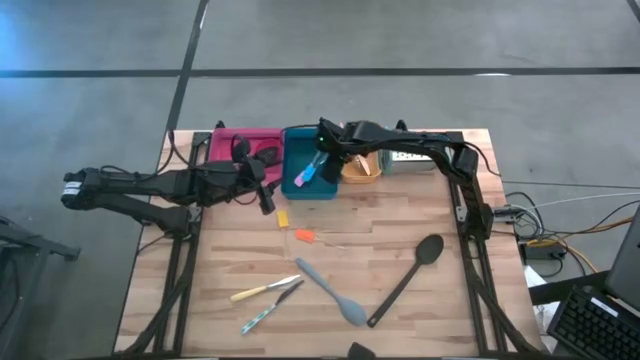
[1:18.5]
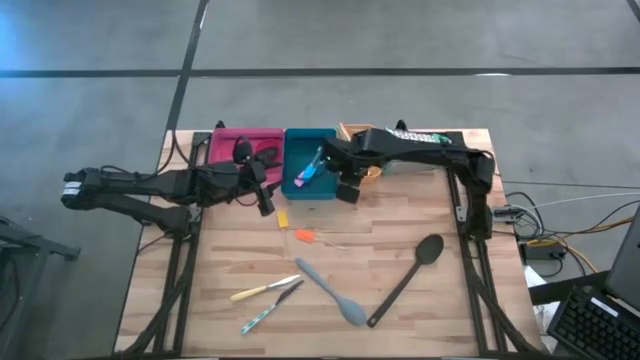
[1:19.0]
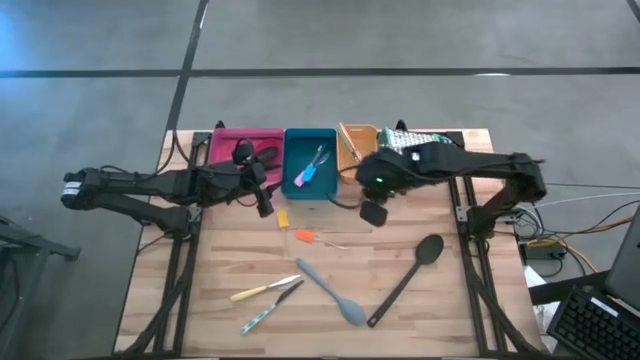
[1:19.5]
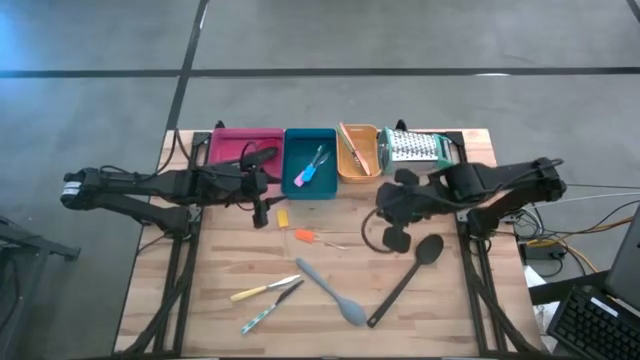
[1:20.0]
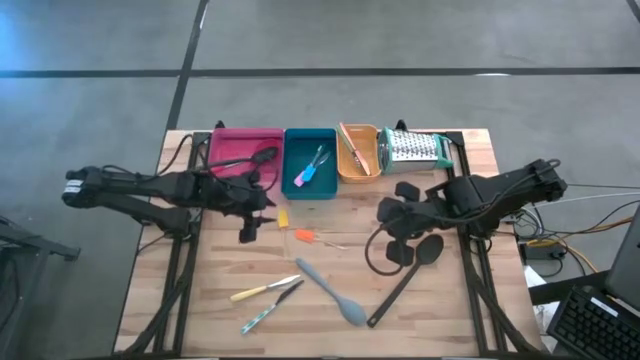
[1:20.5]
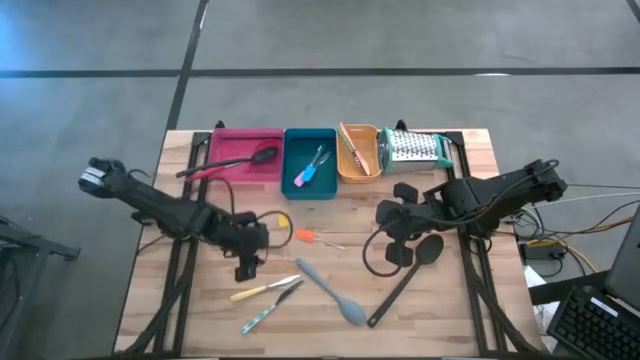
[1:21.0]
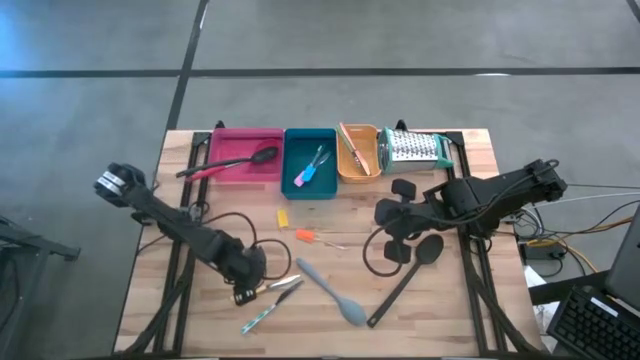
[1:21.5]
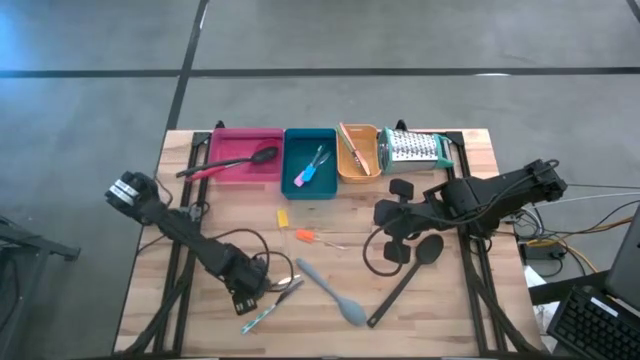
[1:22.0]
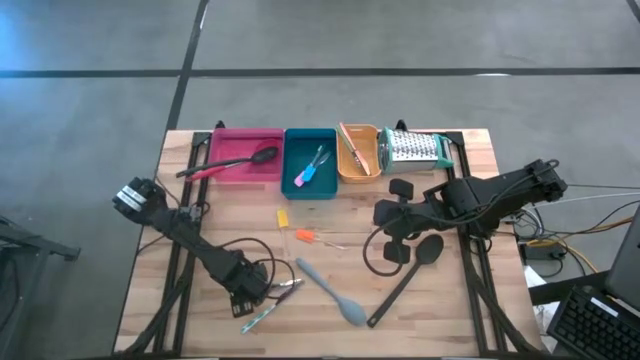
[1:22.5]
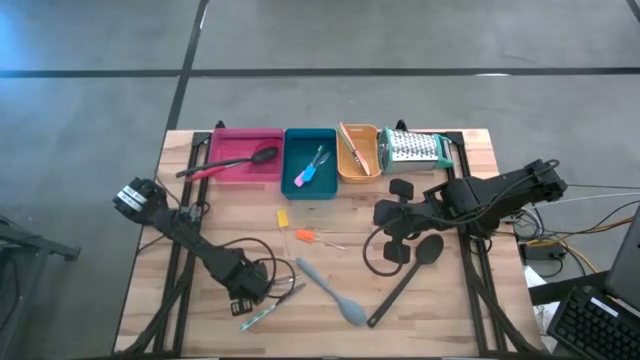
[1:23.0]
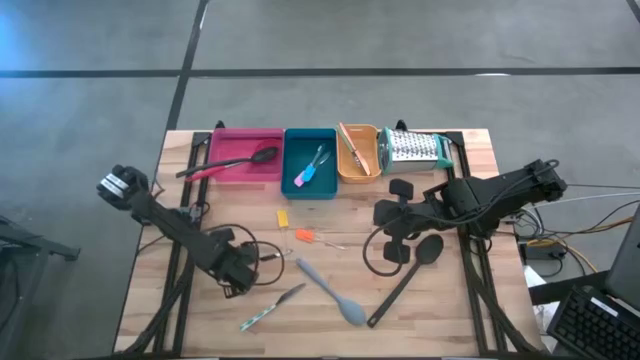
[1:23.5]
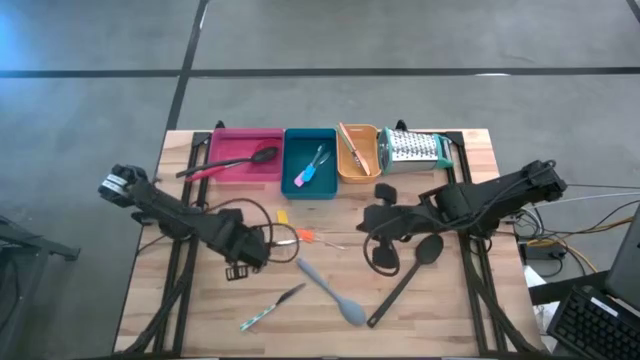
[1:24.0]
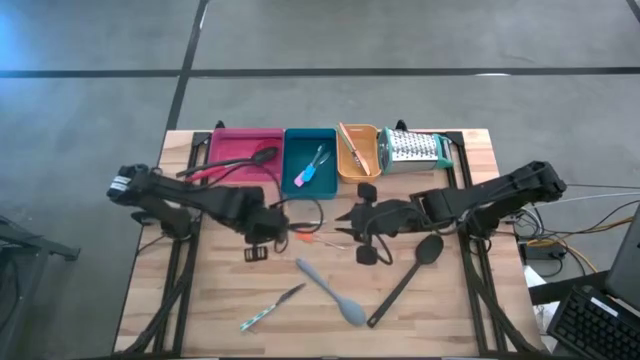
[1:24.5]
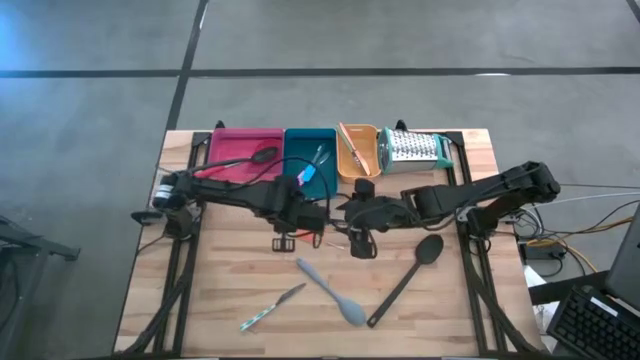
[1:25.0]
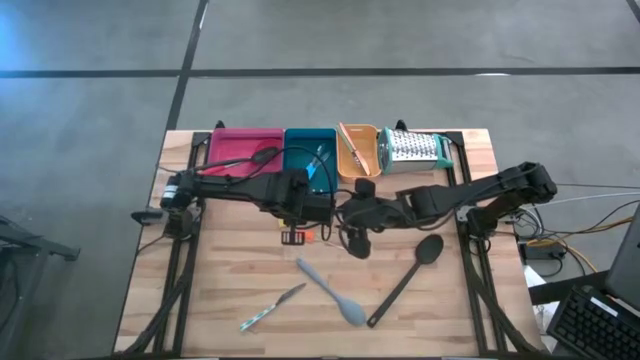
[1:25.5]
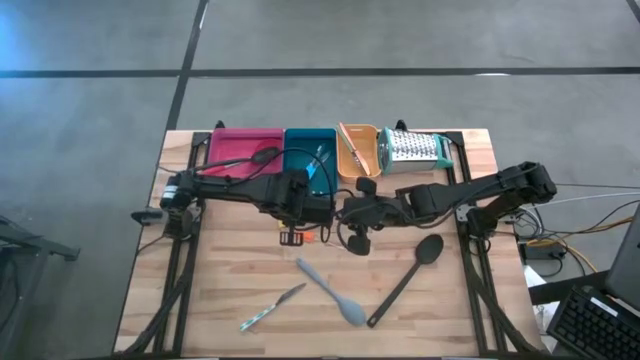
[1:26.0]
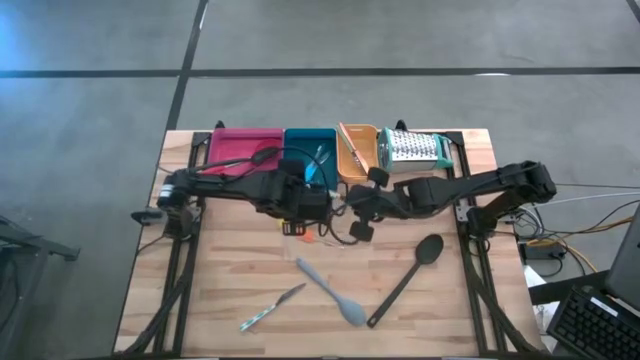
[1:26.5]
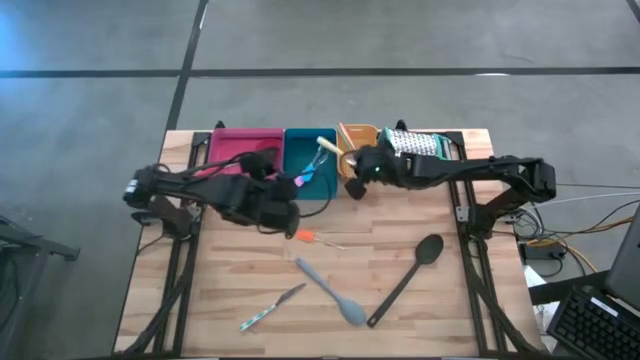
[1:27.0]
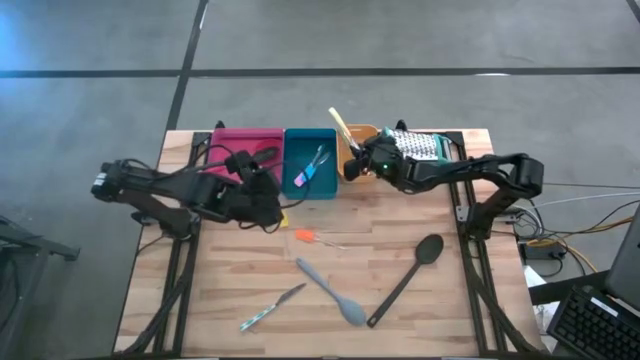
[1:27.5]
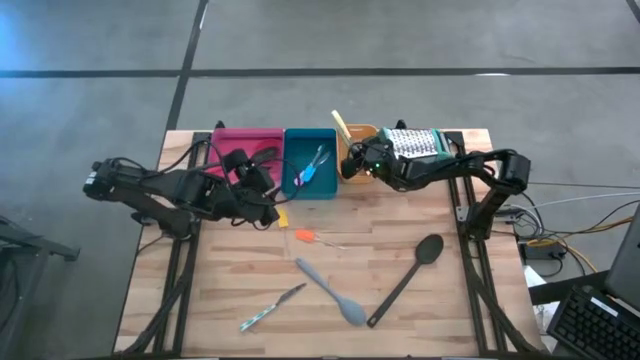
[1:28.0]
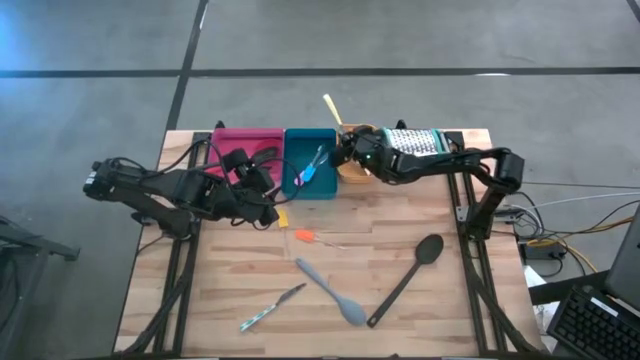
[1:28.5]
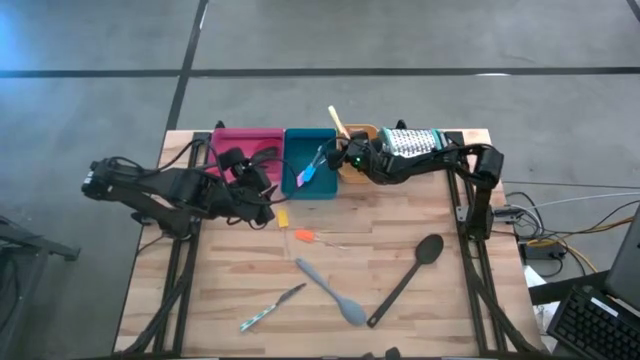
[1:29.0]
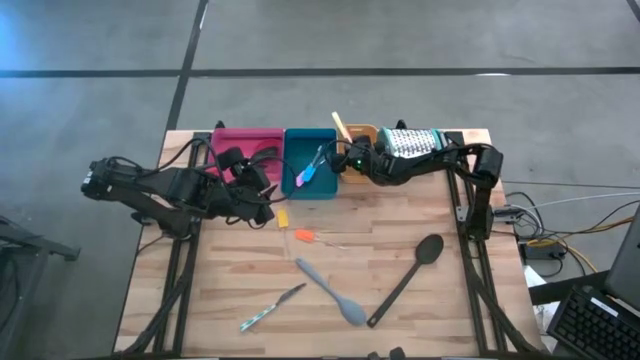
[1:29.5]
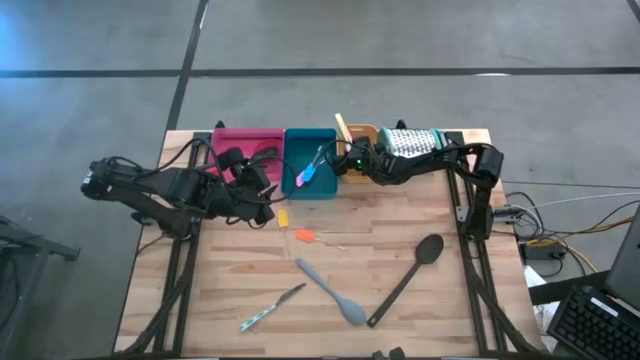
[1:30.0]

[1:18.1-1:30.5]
Task: Pick & Place Kitchen Items
Put the yellow knife into the yellow bin

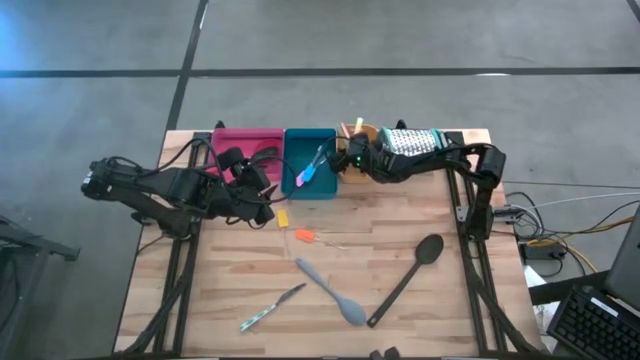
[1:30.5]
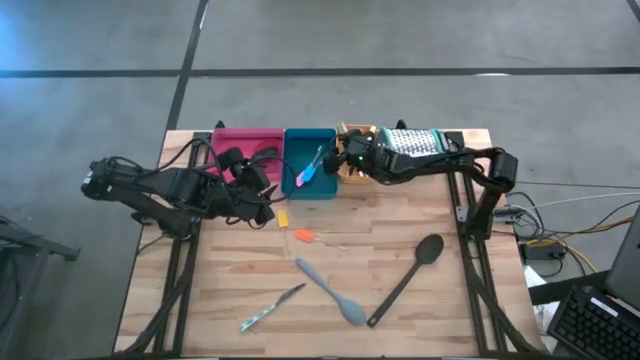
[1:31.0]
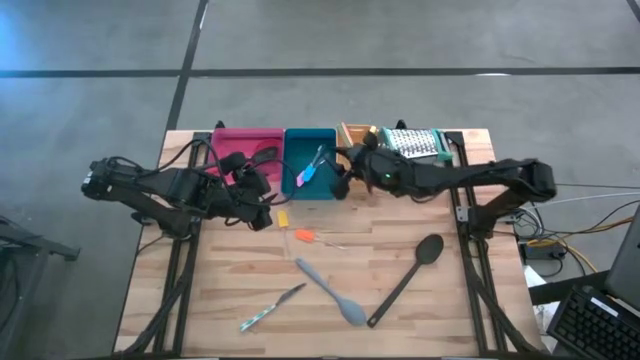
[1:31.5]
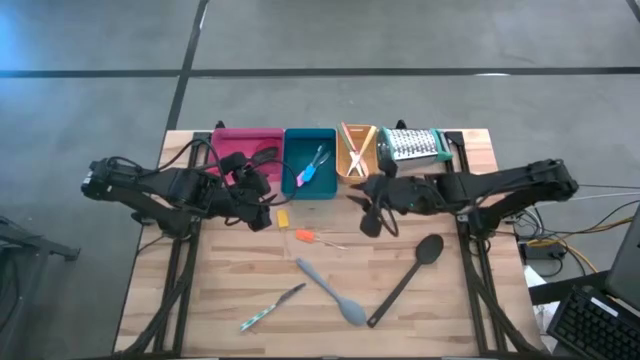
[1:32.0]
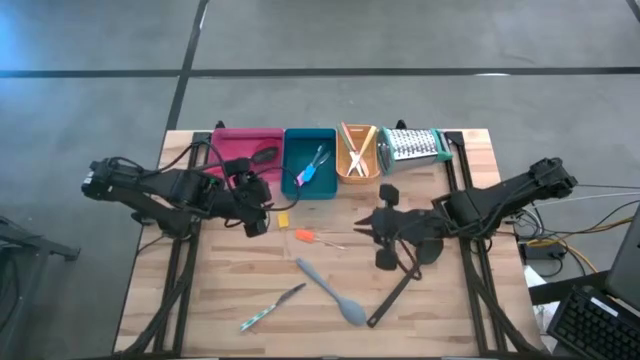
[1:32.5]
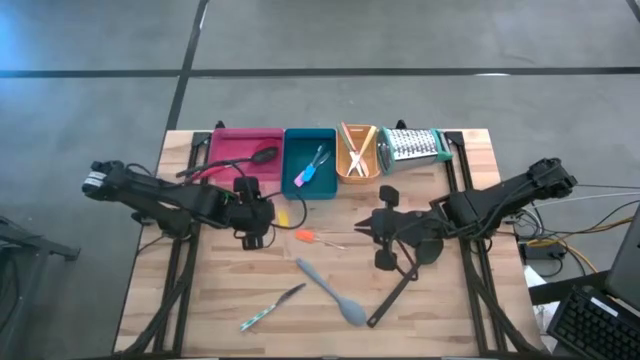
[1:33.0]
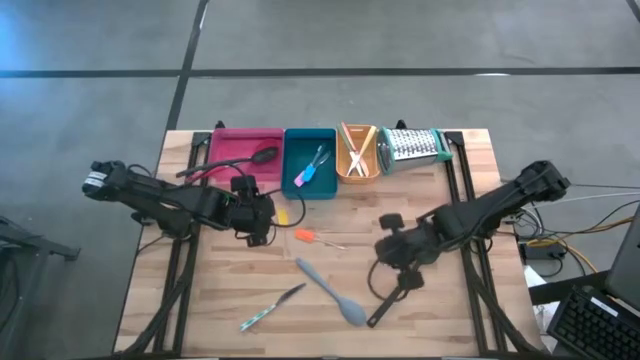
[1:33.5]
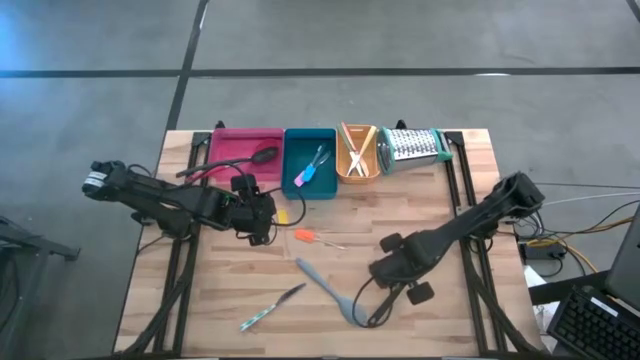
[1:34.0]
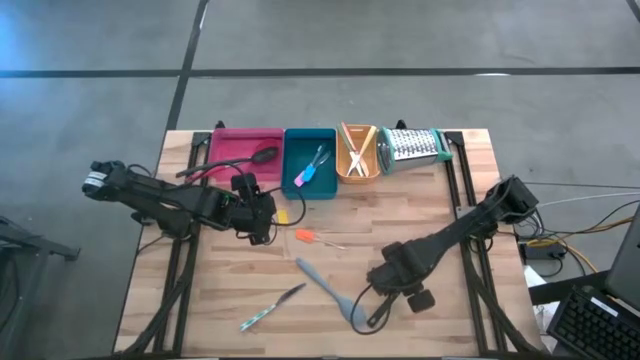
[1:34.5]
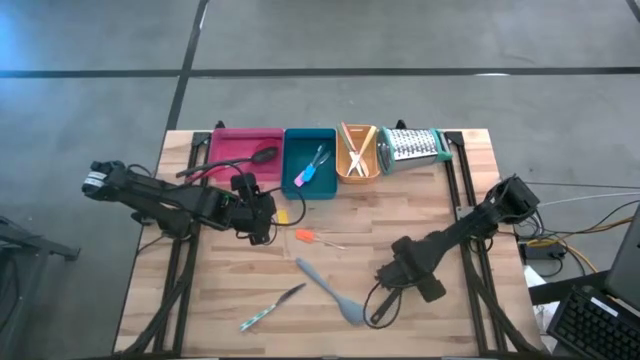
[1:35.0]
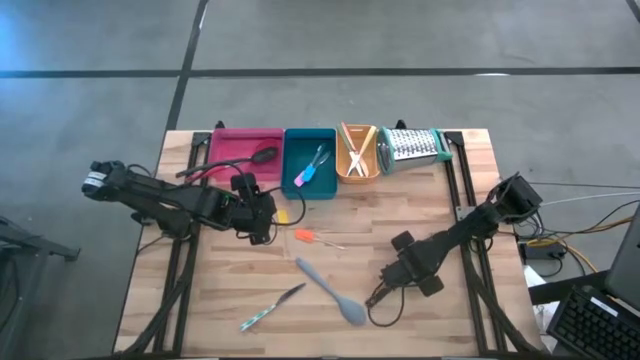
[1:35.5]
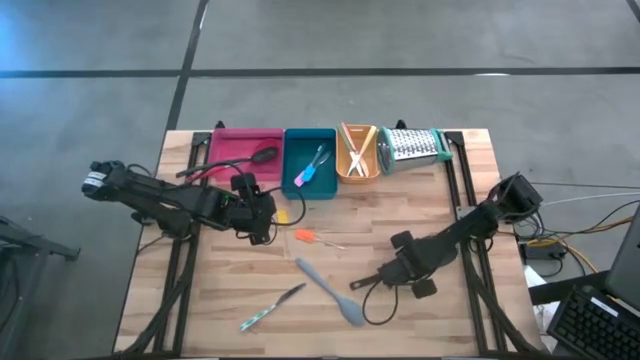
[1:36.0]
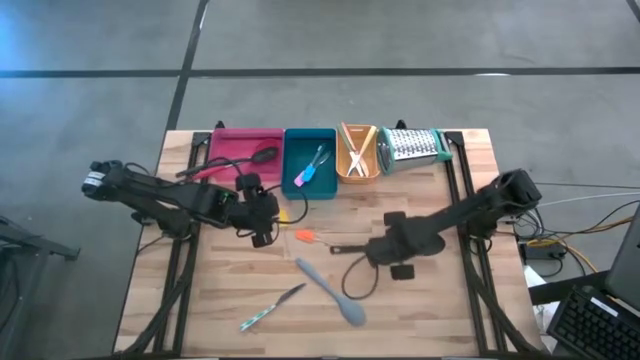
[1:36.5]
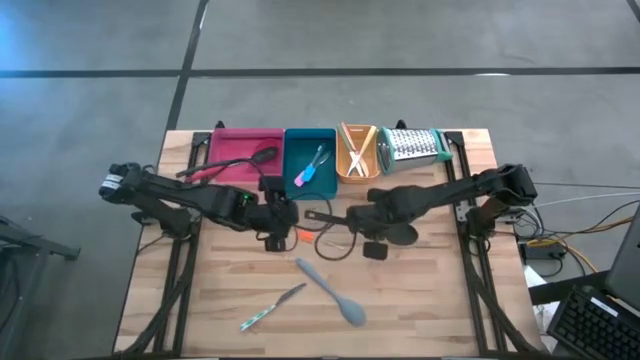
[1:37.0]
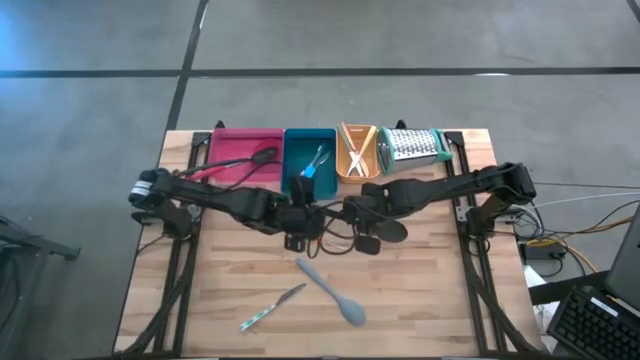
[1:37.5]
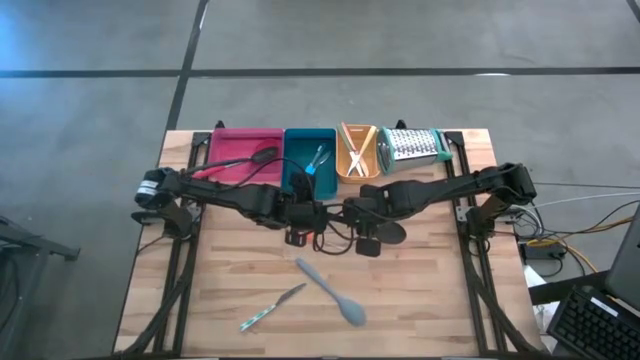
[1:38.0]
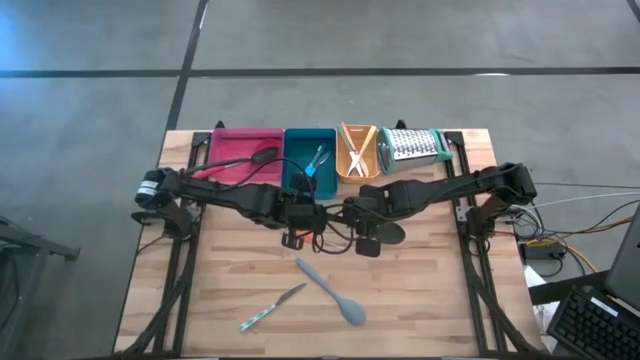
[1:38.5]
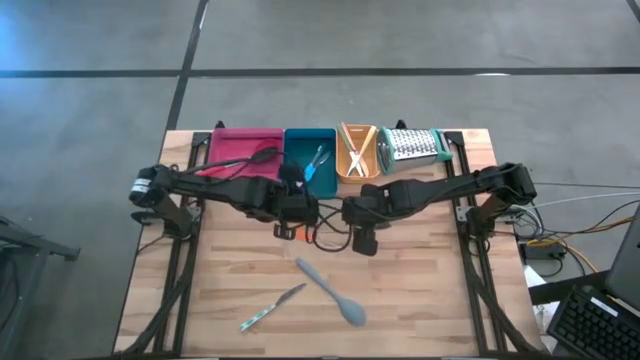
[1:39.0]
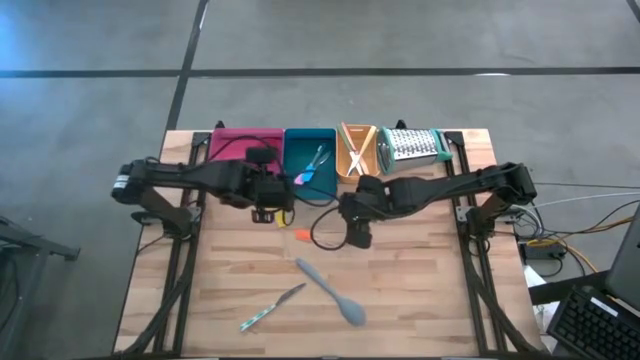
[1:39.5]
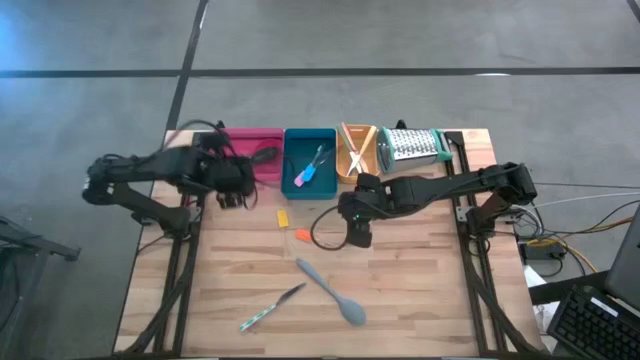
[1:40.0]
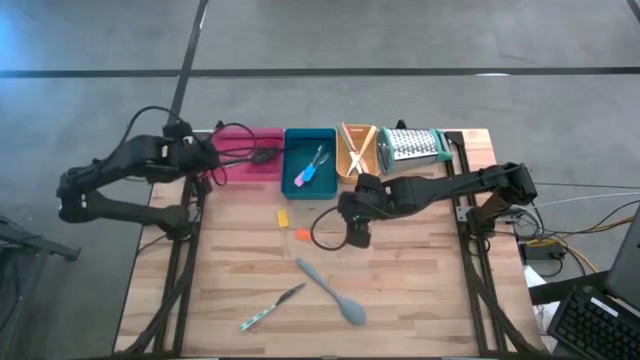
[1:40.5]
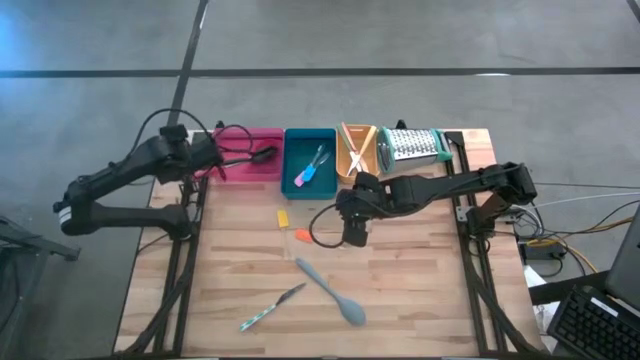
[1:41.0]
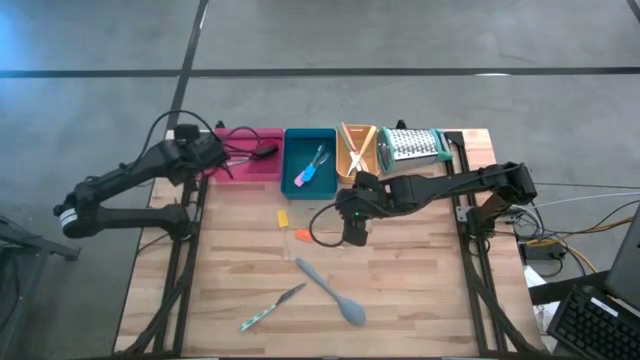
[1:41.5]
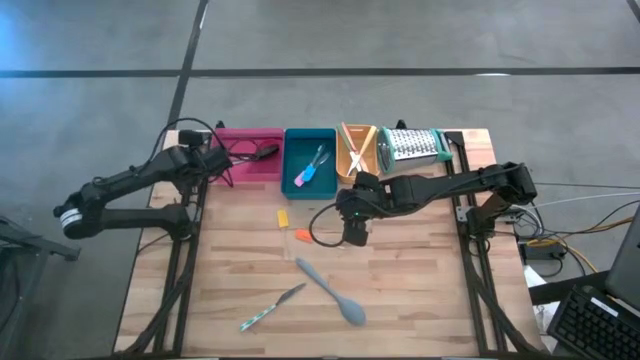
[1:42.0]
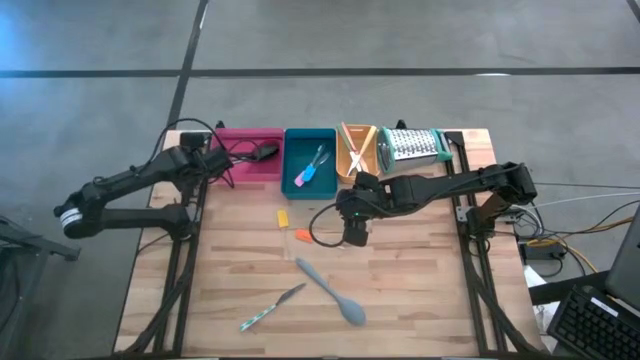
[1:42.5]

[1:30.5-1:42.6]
Put the black spoon into the pink bin
